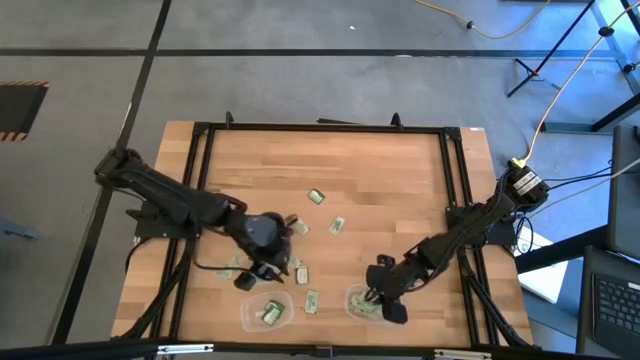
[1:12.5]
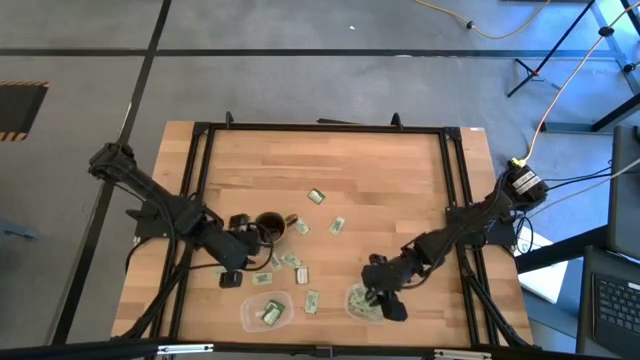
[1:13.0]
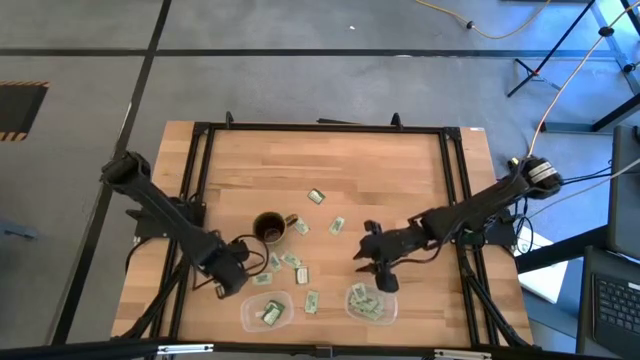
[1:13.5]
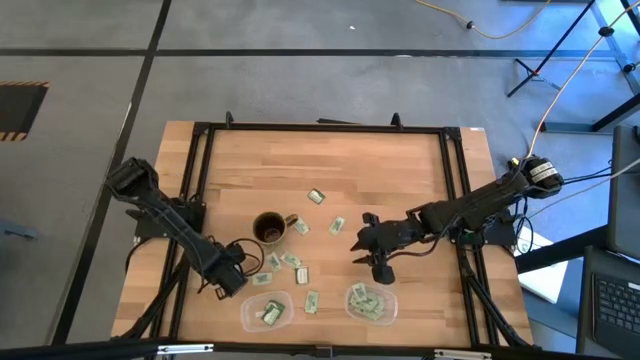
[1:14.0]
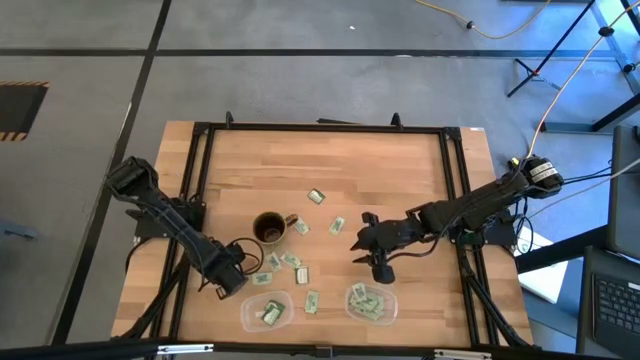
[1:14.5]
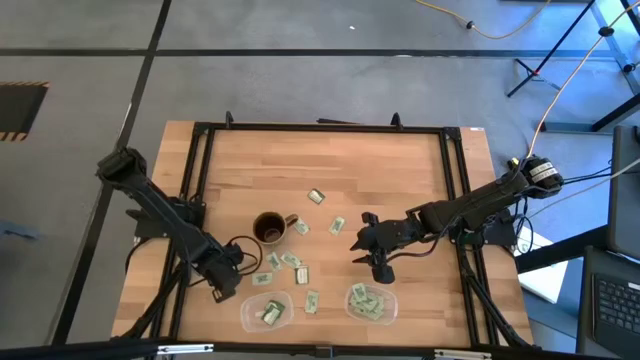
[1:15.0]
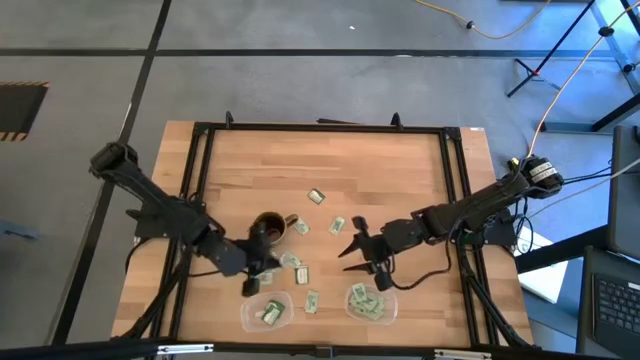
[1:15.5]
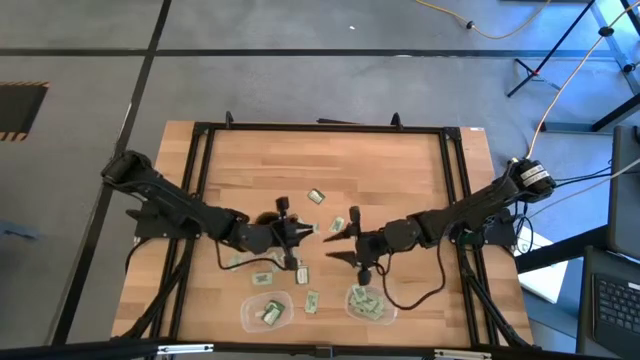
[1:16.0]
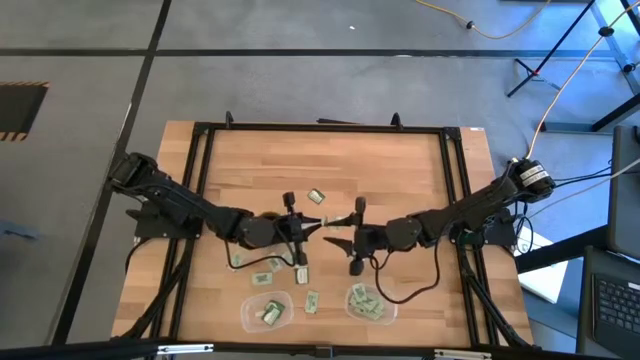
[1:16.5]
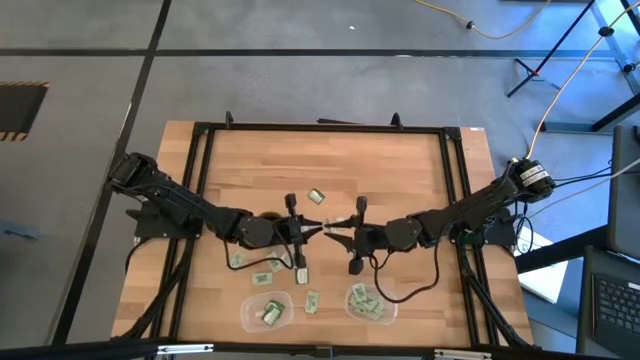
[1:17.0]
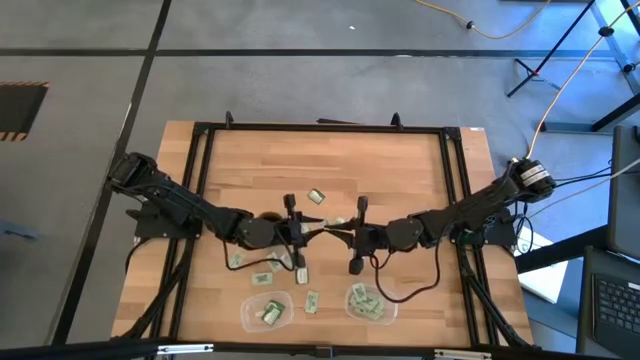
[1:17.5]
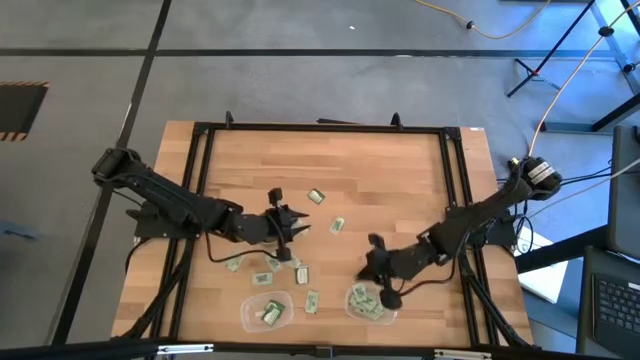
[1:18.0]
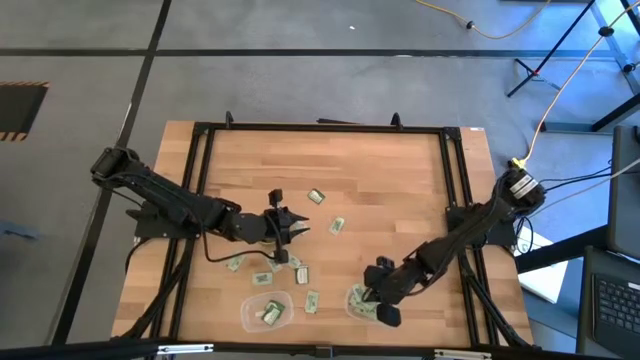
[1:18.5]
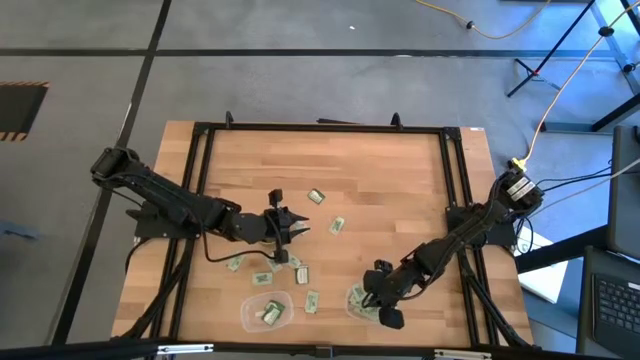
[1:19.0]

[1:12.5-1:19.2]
Task: Pick and place items into bin
Put the white stevia packet into the right transparent bin

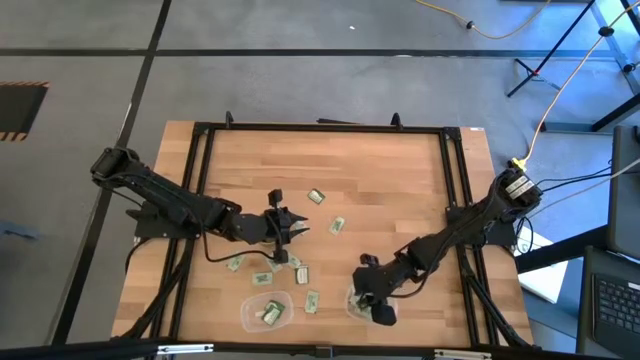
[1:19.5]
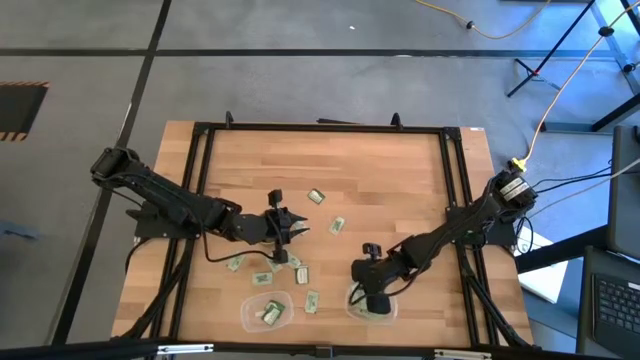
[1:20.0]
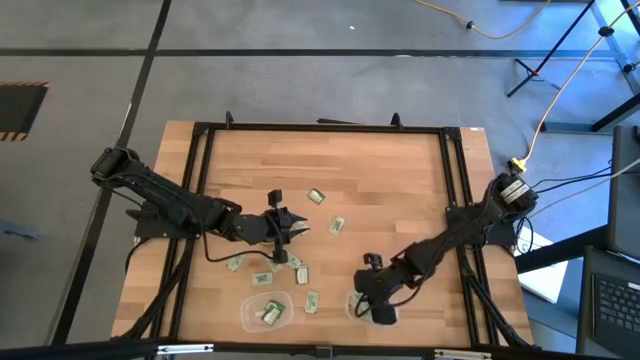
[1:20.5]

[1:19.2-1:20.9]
Adjust the white stevia packet

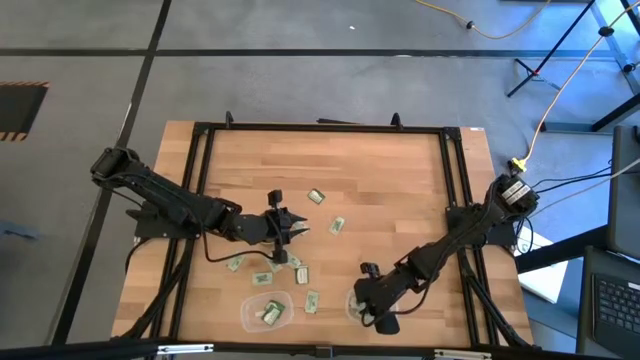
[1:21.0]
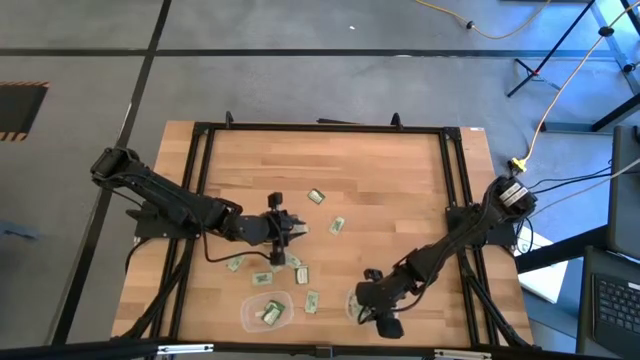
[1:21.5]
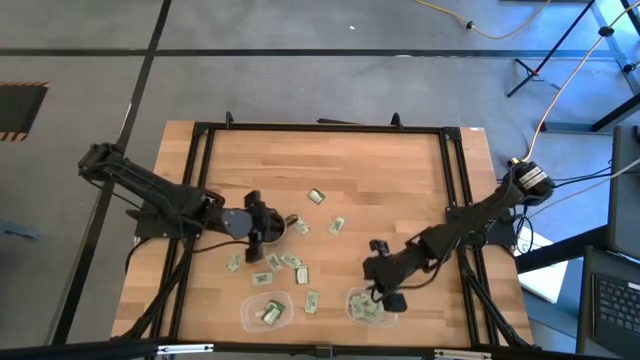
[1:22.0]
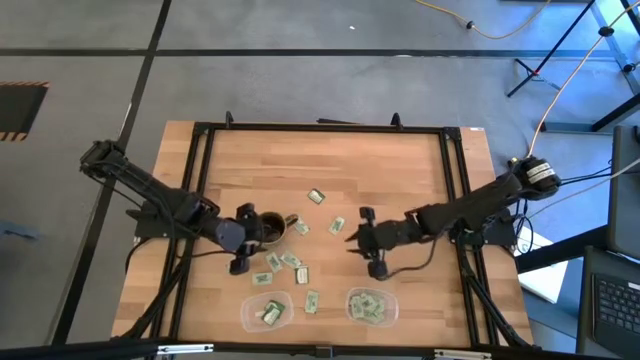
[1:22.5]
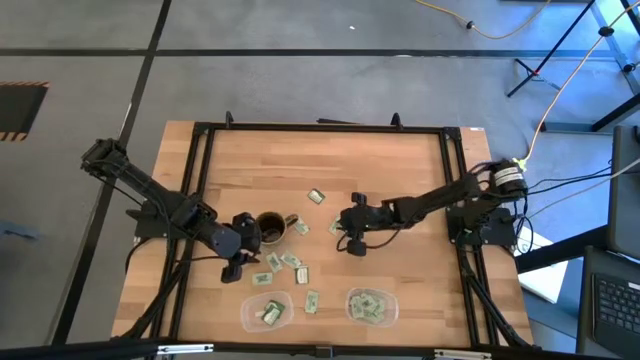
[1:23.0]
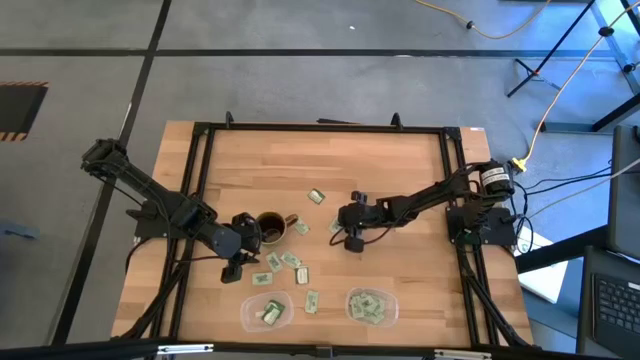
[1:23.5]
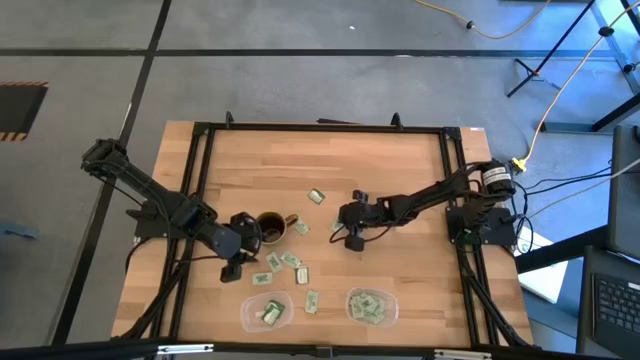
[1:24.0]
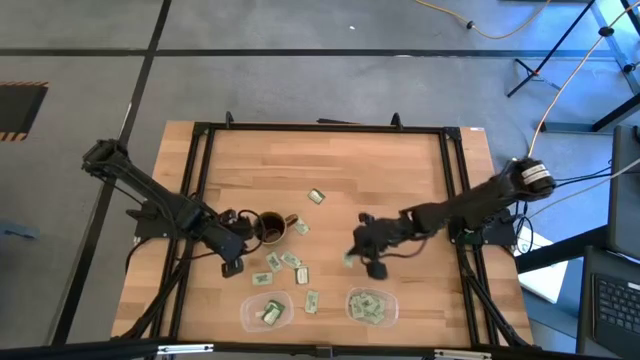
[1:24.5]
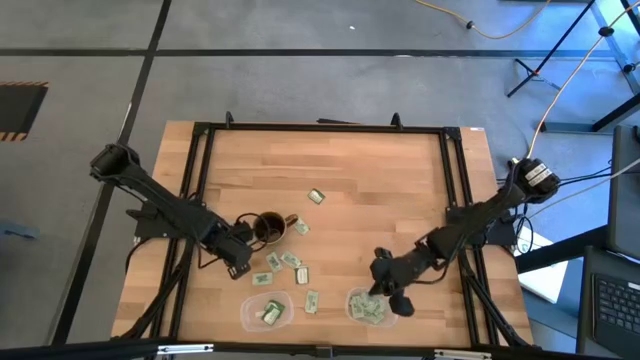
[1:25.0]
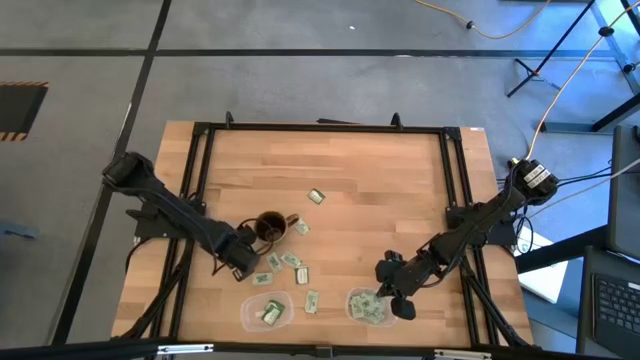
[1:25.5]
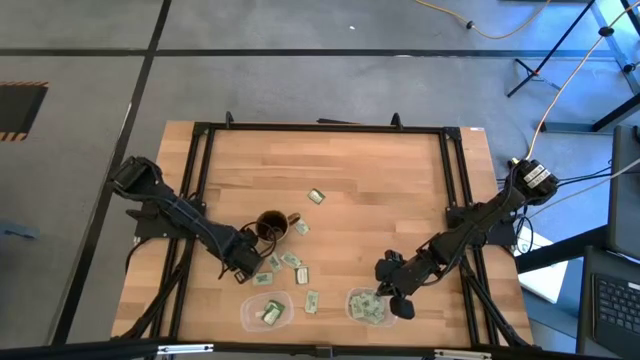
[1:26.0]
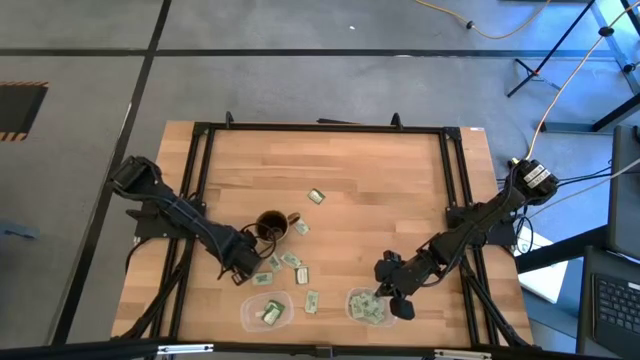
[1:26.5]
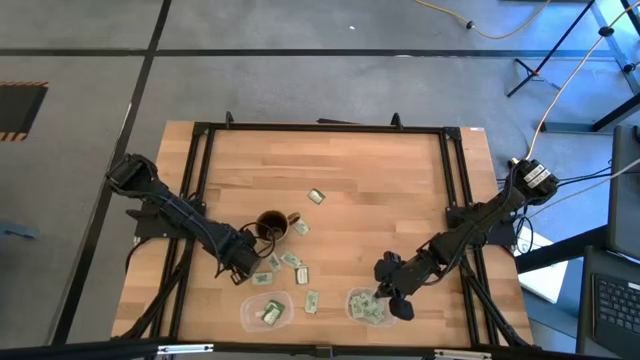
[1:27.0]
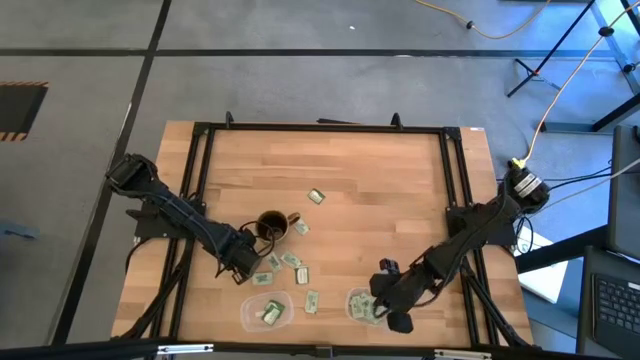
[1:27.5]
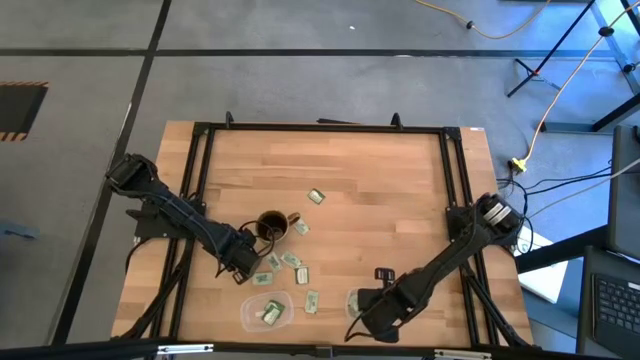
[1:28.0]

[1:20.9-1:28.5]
Put the white stevia packet into the right transparent bin

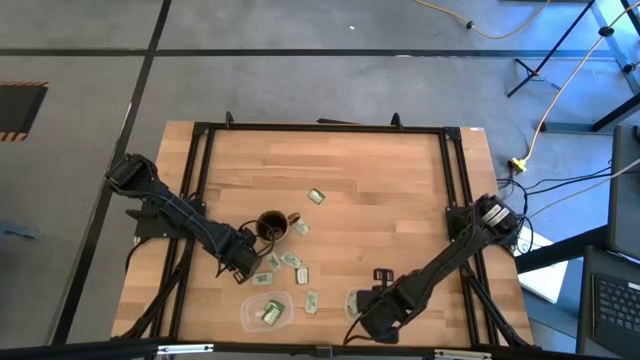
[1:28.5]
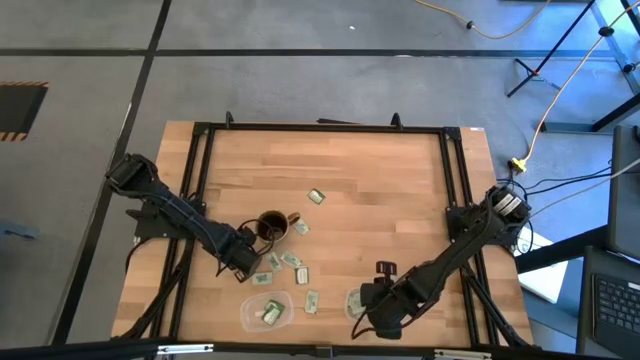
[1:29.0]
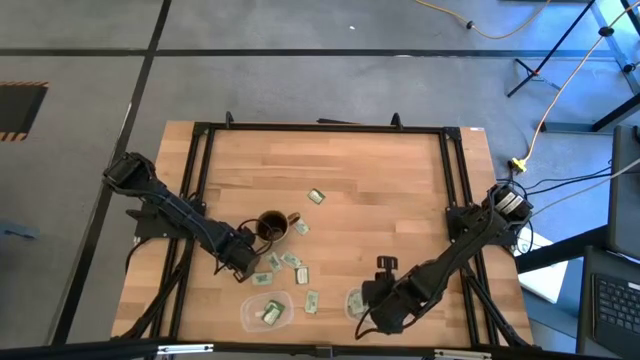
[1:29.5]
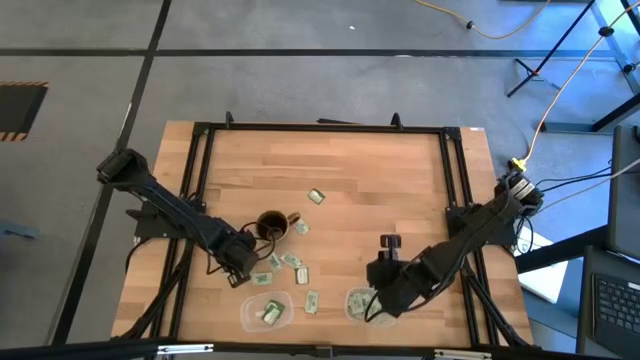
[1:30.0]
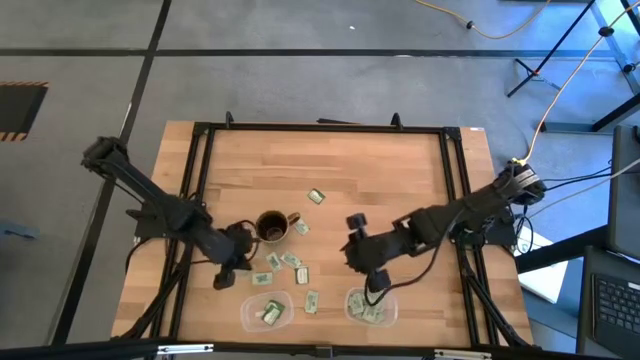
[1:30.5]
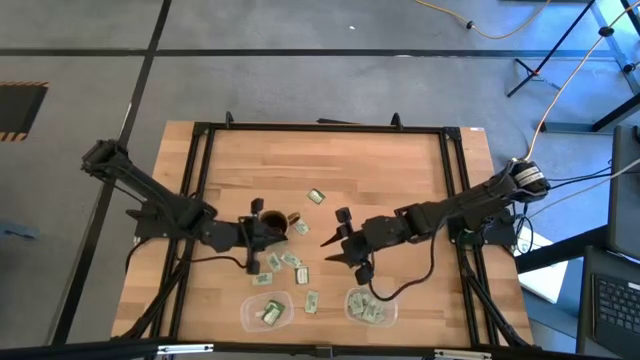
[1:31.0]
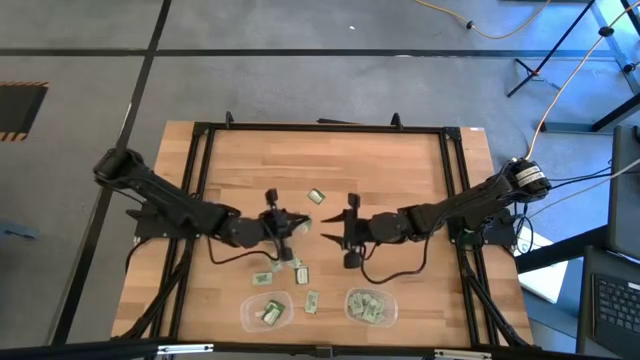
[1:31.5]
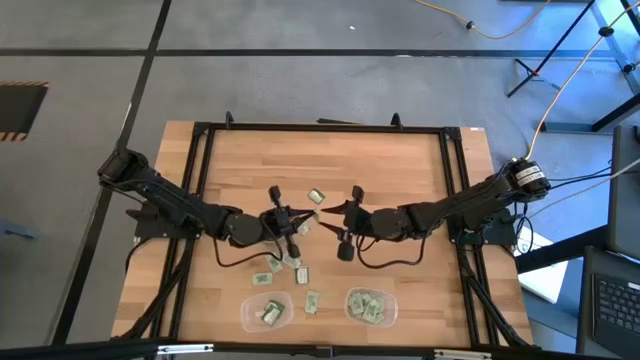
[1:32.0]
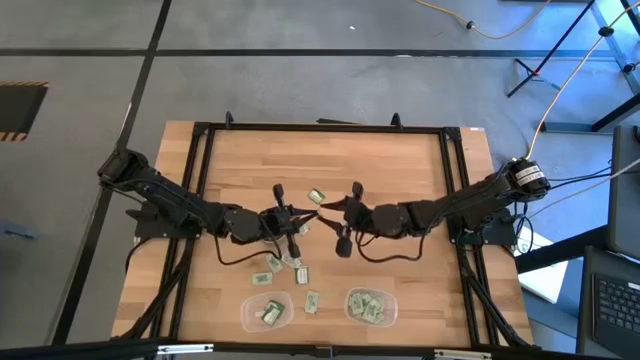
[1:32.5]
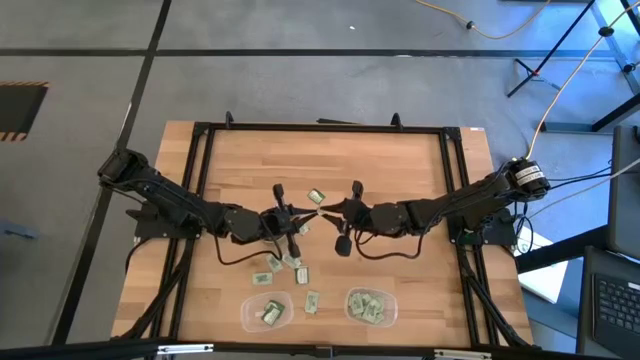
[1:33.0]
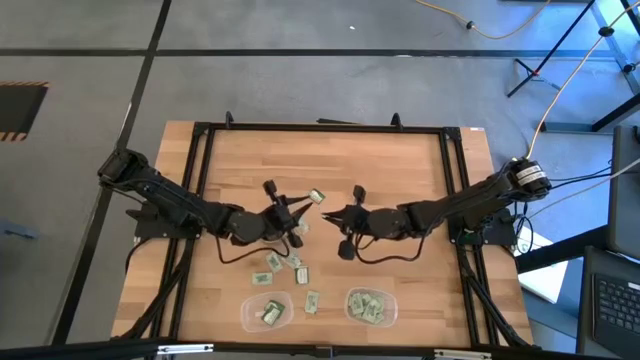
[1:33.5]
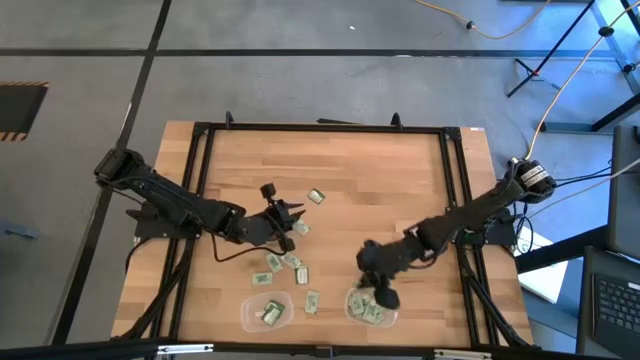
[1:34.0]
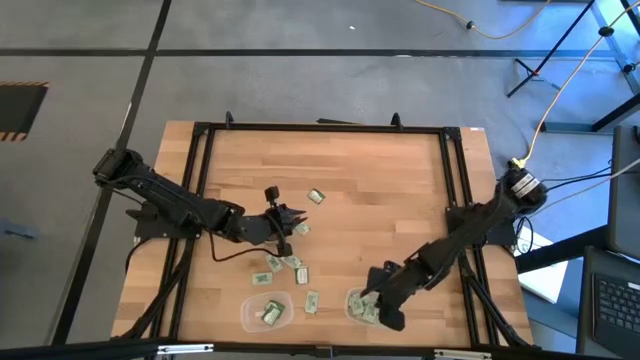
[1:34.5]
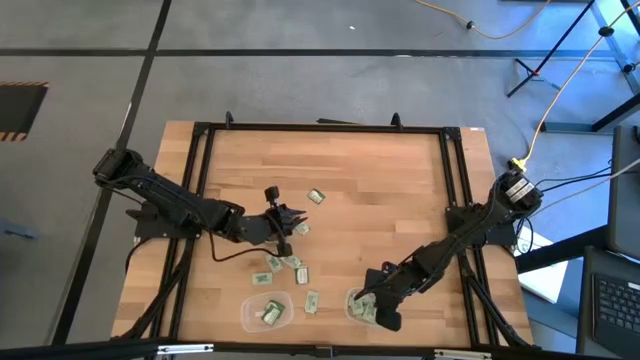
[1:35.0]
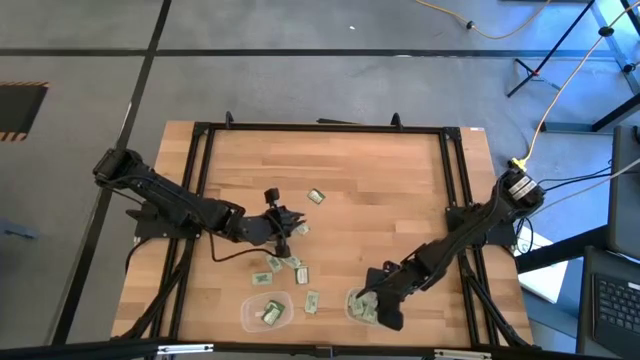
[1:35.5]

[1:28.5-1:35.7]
Put the white stevia packet into the right transparent bin
